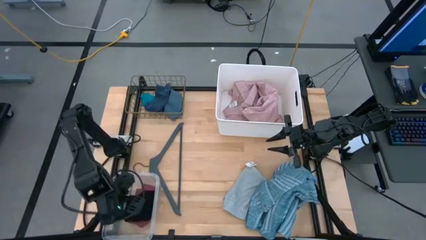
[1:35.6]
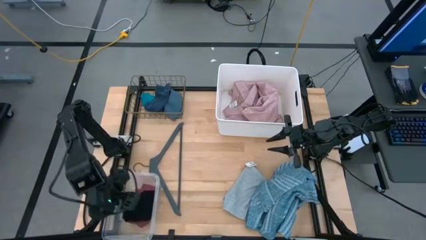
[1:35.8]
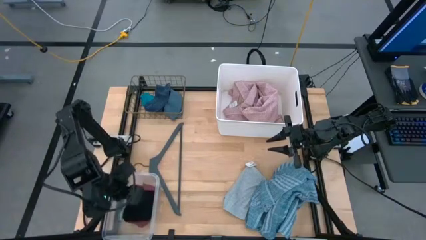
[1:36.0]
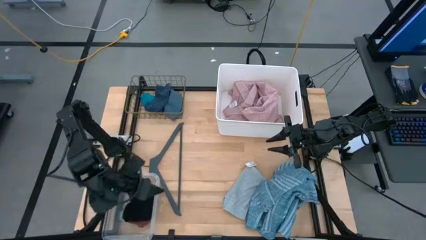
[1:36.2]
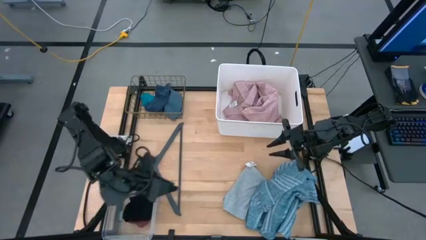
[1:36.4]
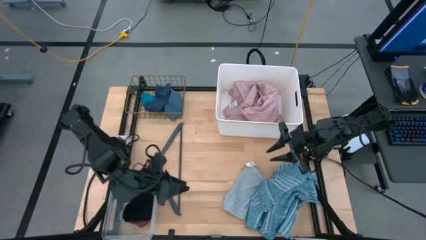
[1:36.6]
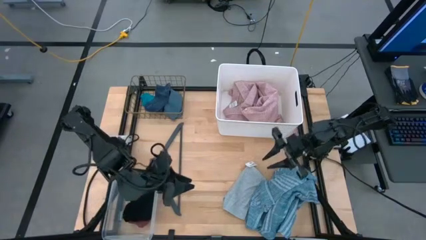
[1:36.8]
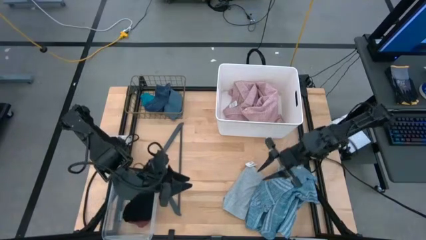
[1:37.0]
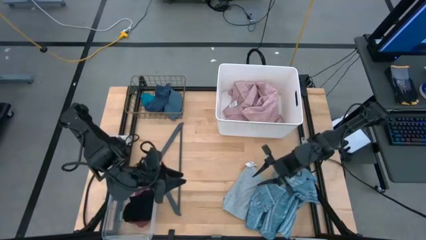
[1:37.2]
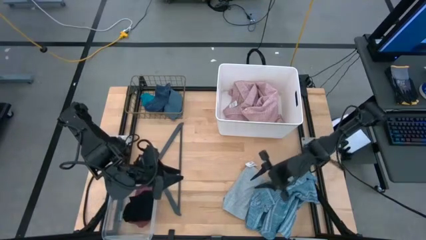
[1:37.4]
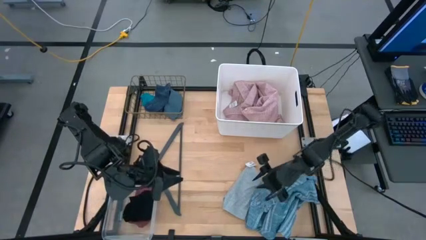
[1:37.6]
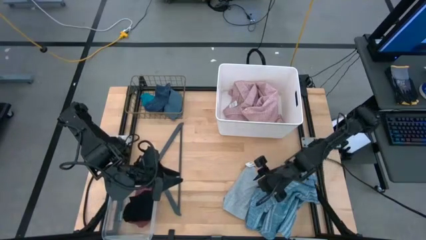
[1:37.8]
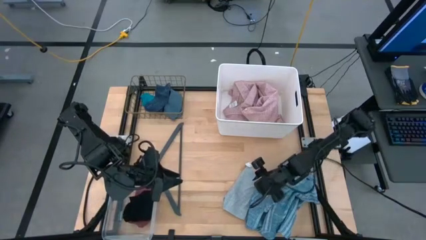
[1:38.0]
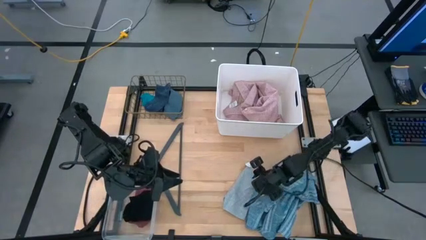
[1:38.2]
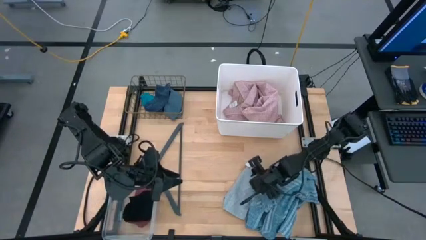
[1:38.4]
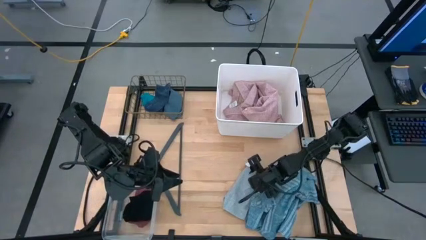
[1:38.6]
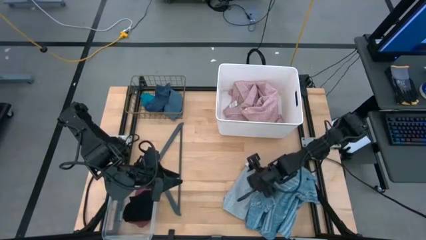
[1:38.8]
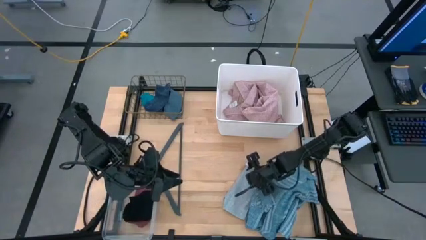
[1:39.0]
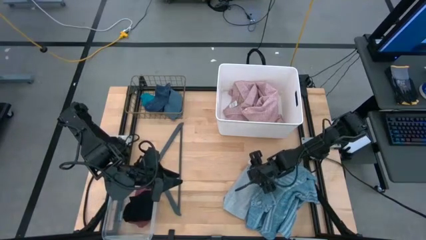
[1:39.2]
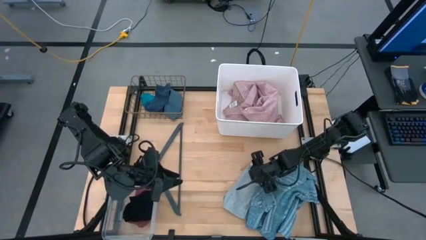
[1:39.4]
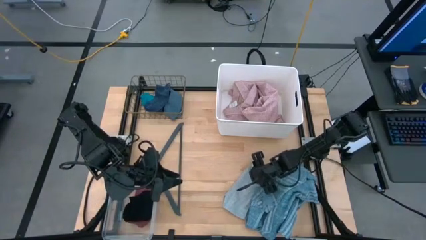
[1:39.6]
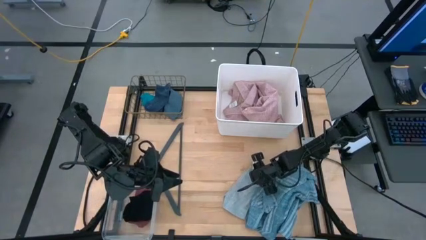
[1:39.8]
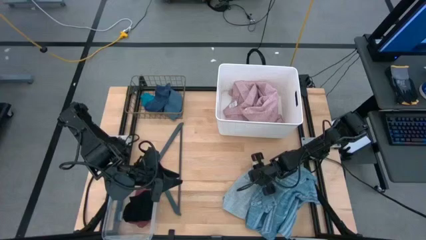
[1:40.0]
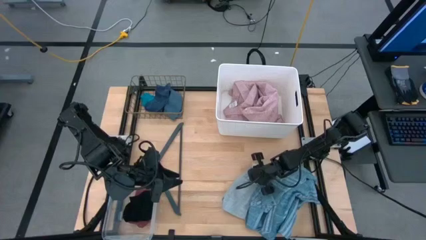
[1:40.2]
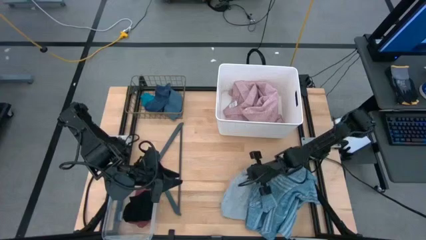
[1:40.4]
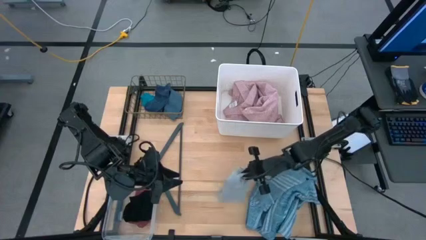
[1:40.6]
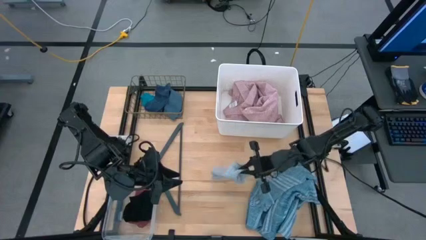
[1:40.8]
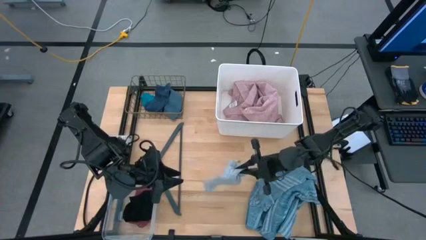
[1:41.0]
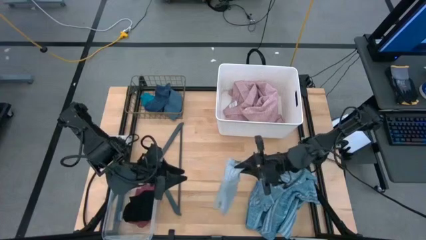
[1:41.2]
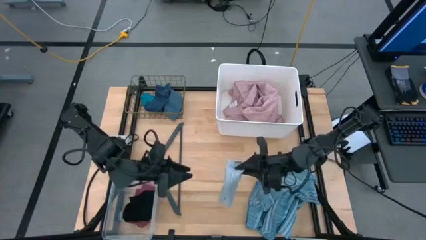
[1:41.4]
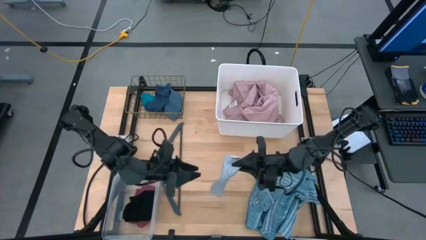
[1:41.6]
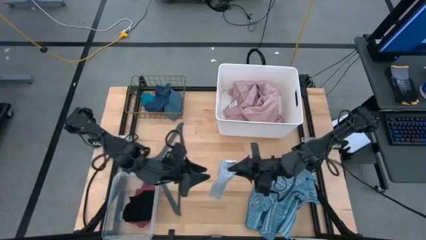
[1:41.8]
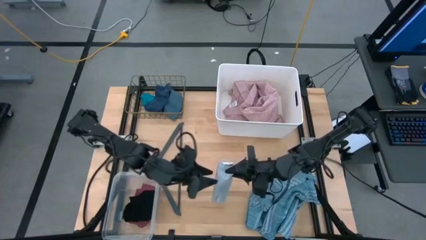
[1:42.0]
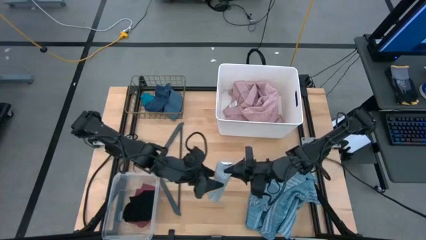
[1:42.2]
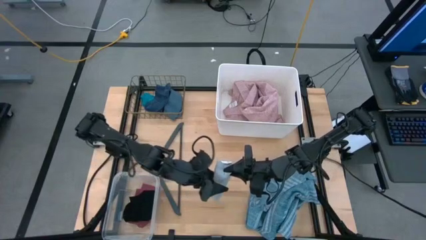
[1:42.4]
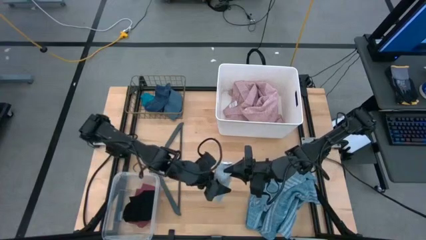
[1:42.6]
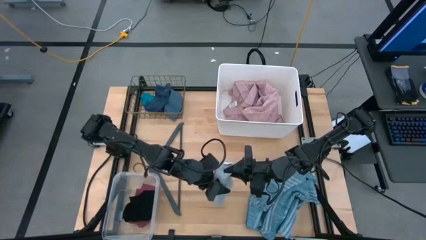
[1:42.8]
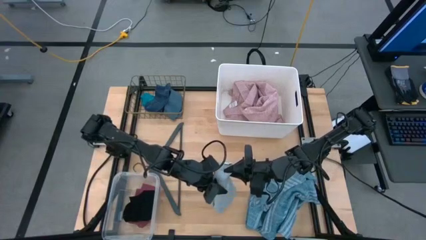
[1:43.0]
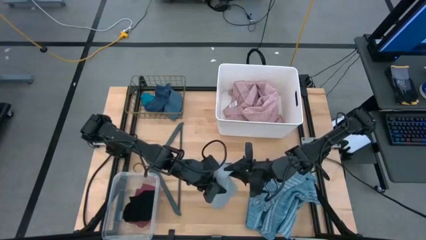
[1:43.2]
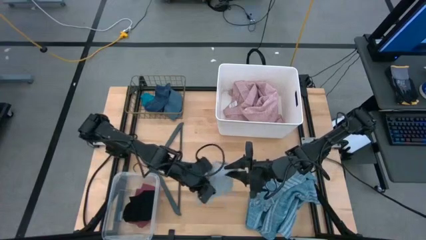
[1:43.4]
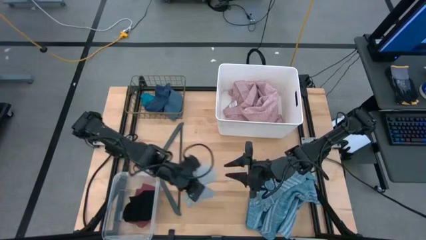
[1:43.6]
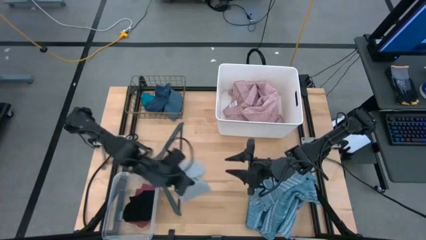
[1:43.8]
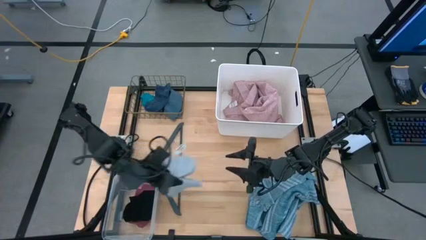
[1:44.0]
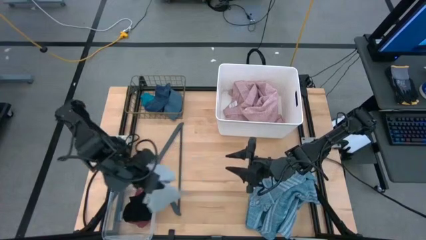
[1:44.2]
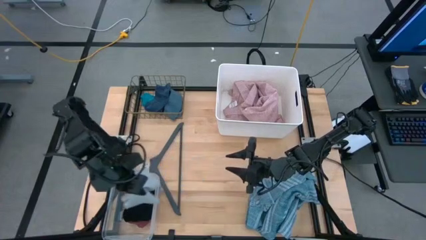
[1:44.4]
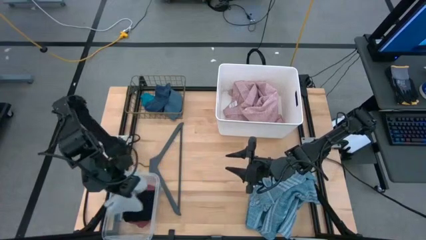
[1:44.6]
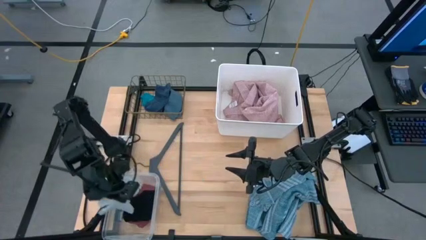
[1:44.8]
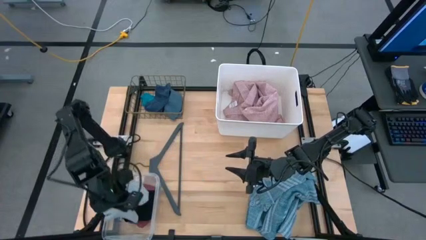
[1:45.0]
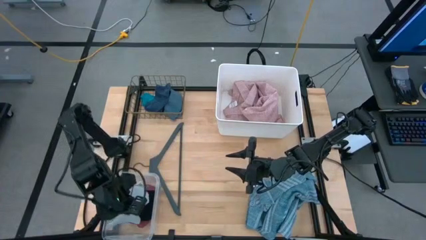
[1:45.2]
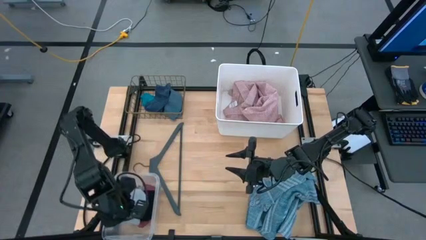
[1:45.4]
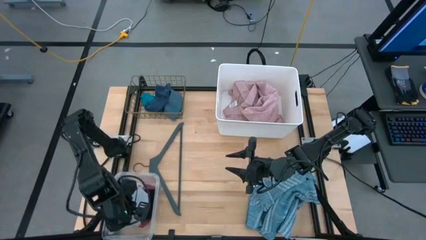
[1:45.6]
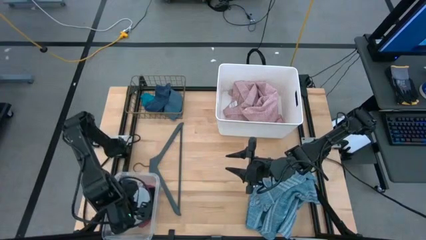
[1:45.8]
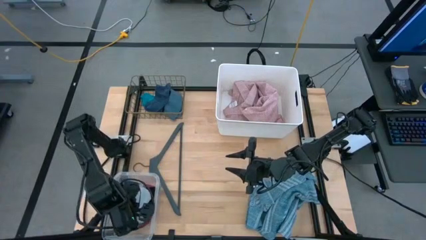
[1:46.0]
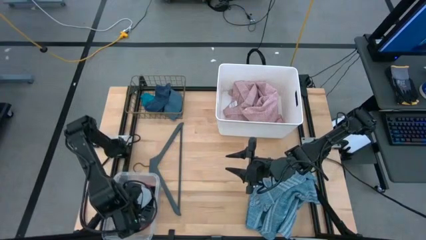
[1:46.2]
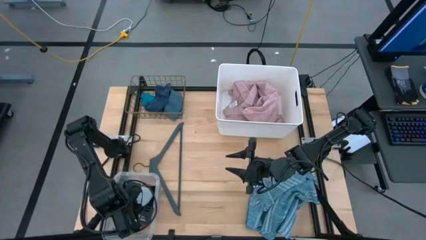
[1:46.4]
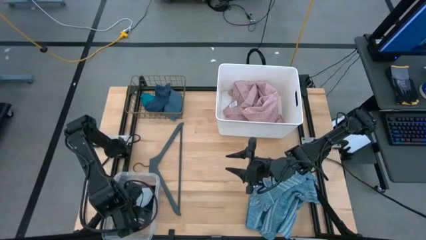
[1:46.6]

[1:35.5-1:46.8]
Task: Pick & Place Cloths
Put the gray boxers in the transparent bin

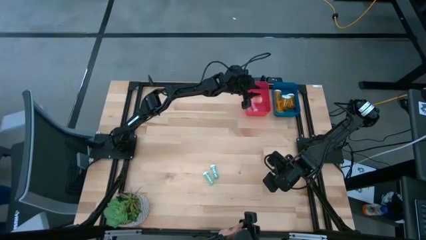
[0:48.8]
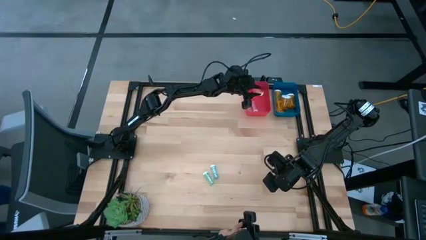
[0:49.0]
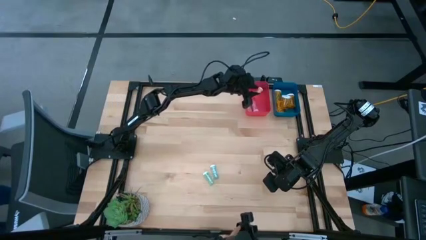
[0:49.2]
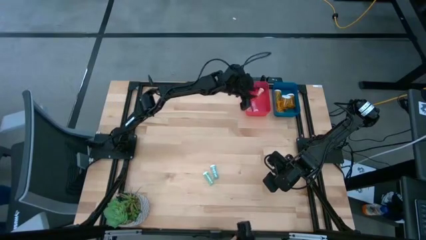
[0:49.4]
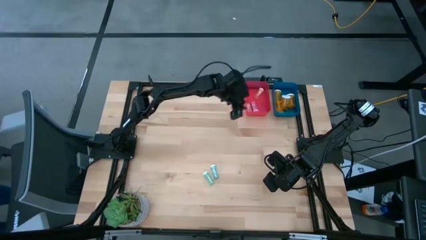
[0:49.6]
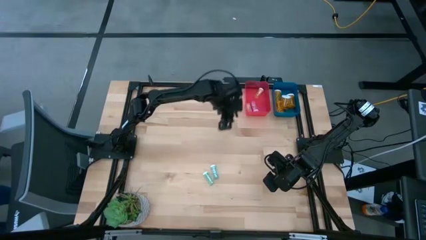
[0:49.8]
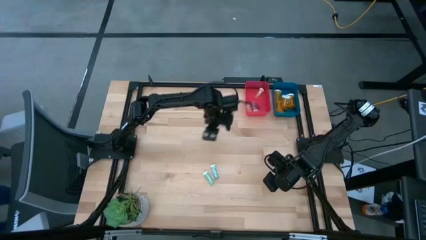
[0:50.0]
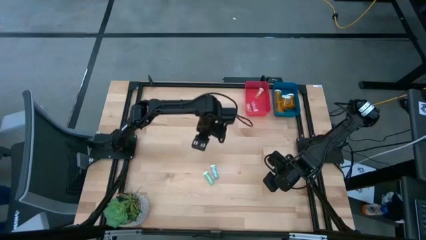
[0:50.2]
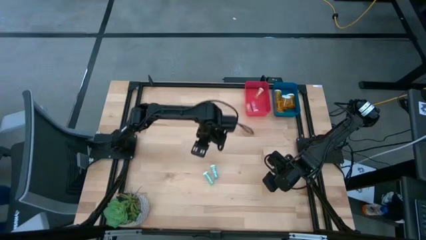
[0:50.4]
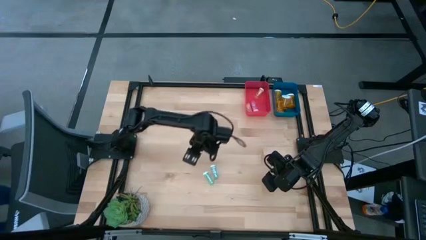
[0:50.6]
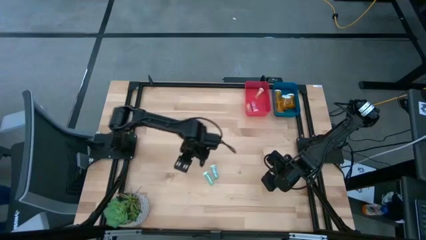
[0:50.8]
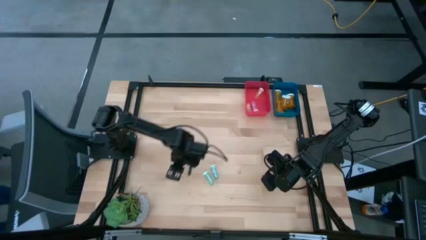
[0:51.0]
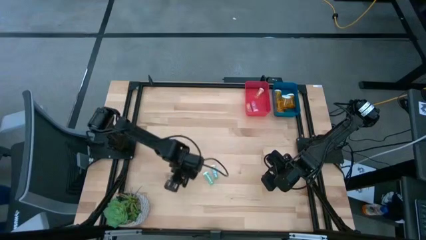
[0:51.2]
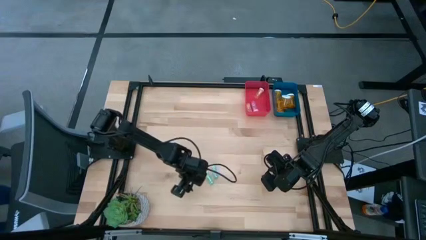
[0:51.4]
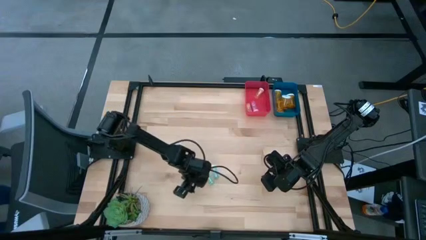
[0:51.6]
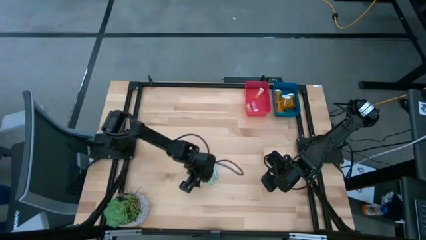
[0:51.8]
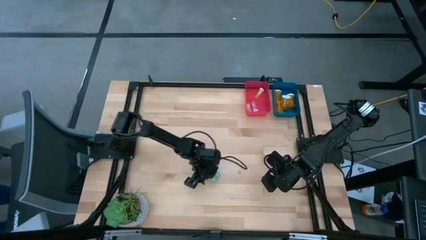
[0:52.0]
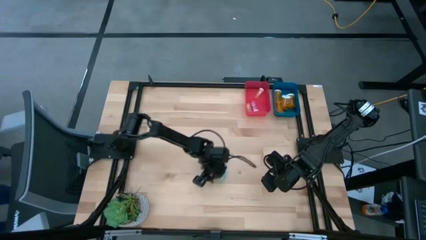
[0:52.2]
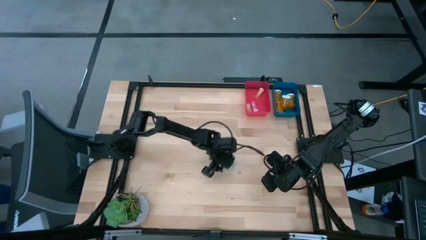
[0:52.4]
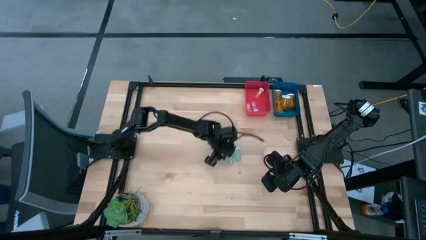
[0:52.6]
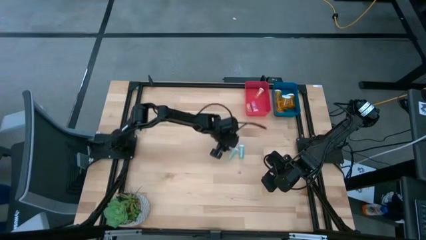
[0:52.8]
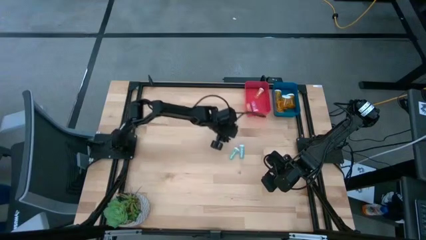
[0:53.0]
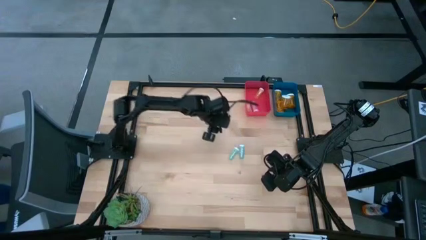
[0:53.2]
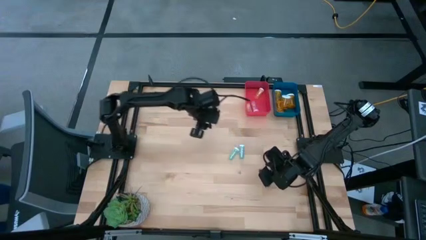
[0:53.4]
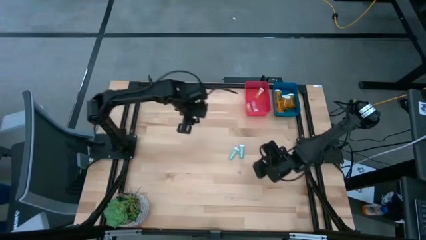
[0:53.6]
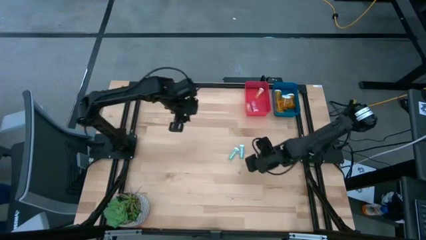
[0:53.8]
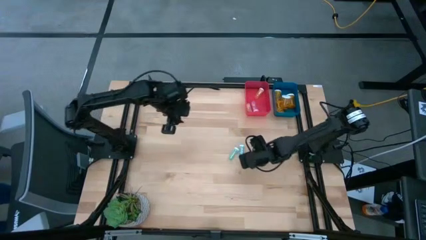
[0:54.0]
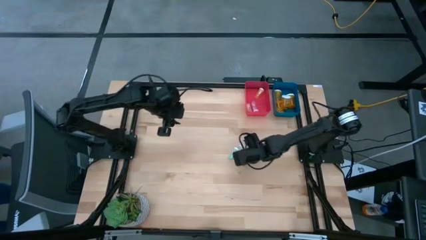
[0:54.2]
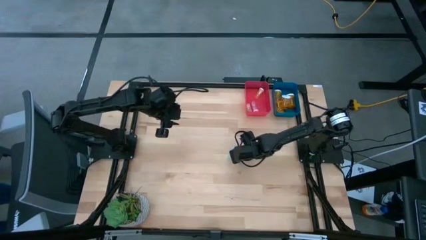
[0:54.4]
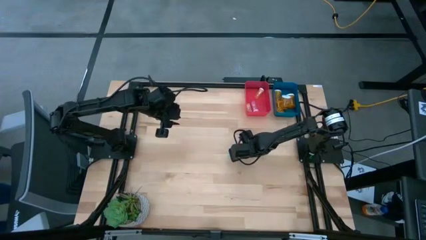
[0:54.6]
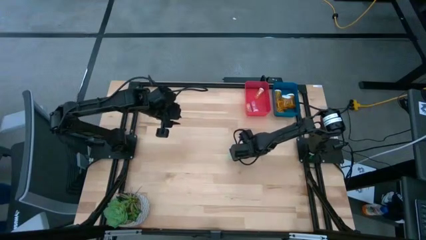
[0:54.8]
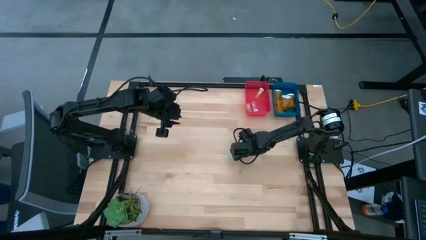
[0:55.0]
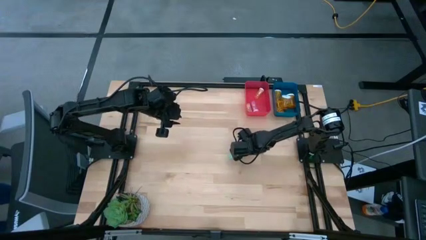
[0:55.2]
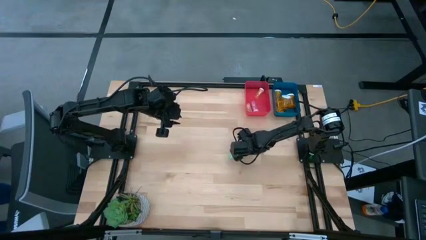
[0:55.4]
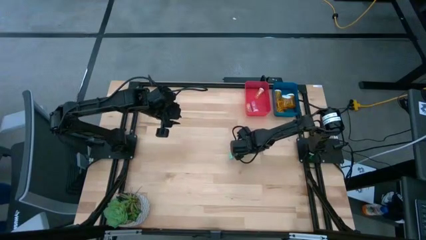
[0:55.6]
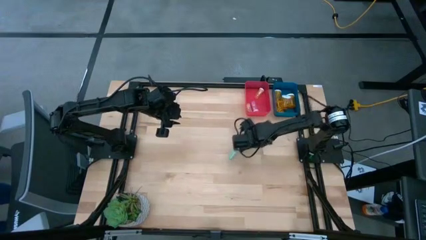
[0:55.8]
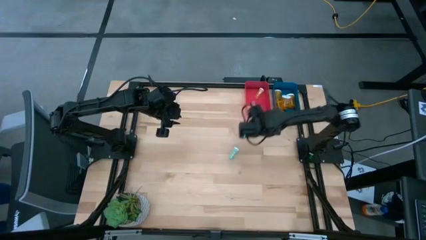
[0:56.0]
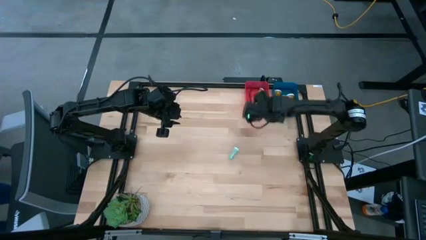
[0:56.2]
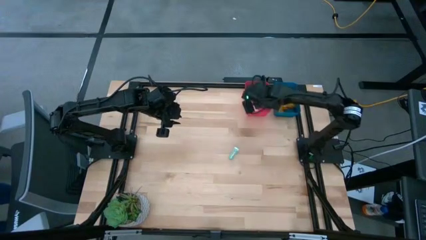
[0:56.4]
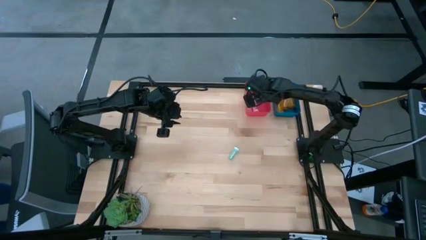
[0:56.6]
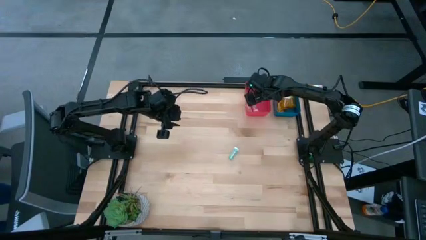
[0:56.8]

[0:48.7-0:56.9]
Task: Pick and place medicine bottles into bin by pill shape (circle, oval)
Put the blue tablet bottle into the red bin
